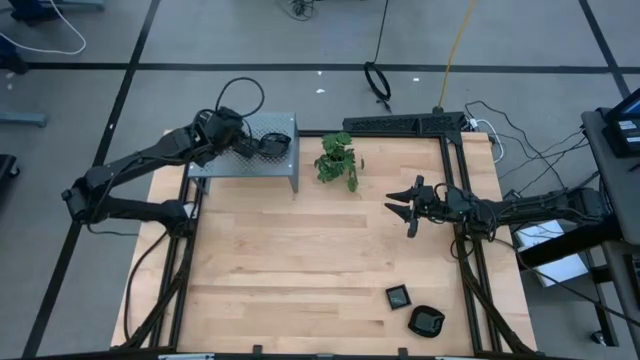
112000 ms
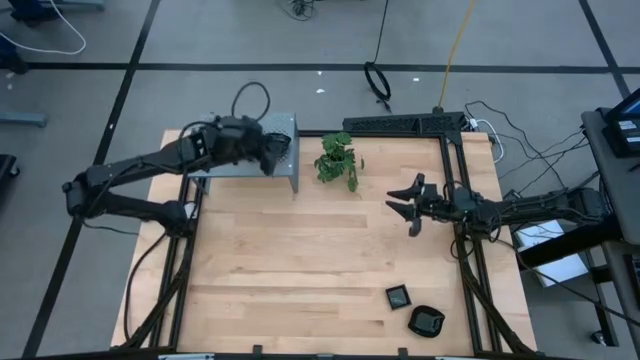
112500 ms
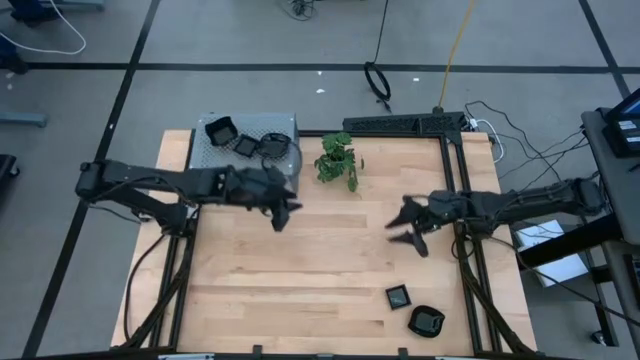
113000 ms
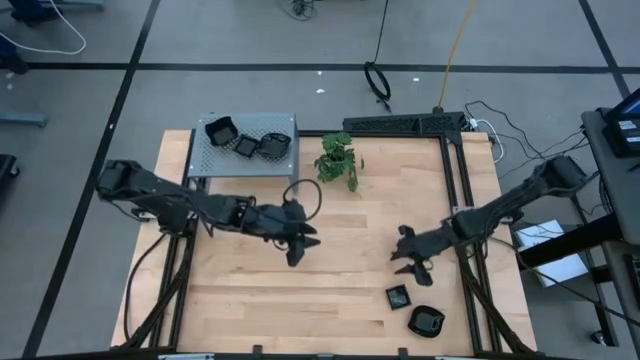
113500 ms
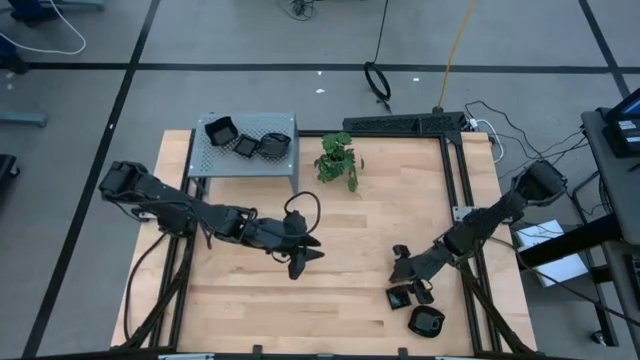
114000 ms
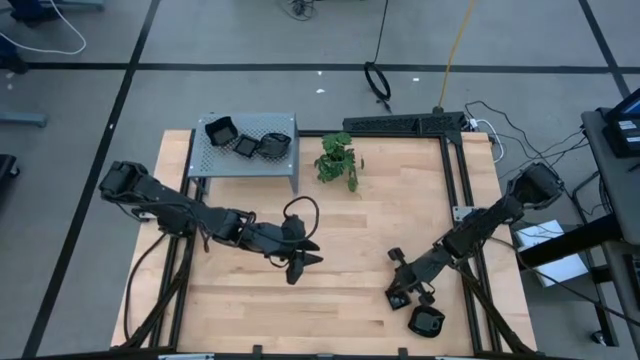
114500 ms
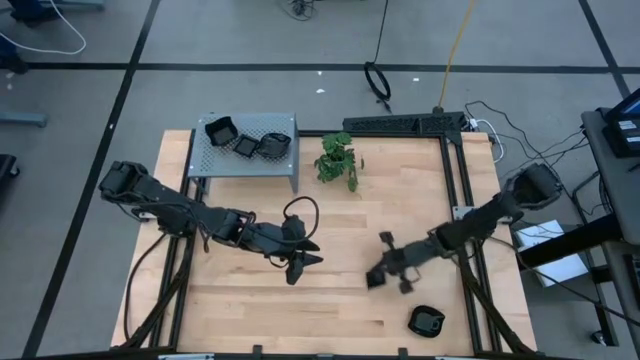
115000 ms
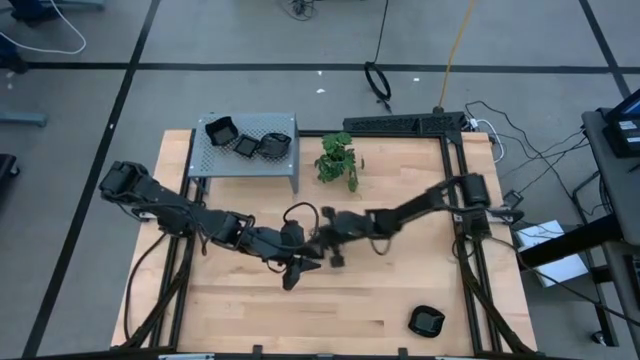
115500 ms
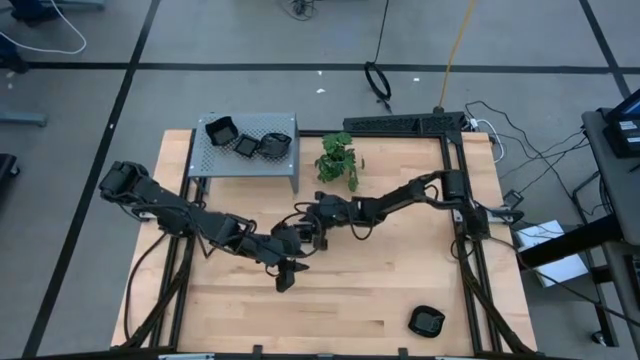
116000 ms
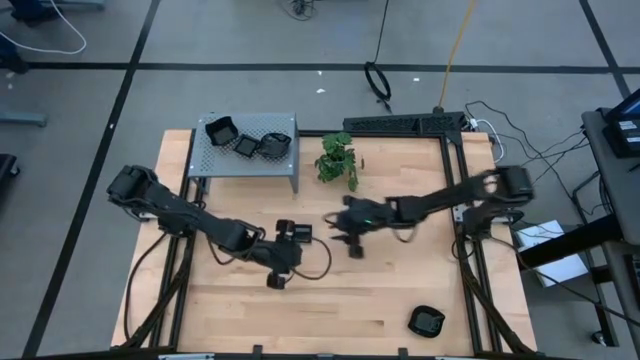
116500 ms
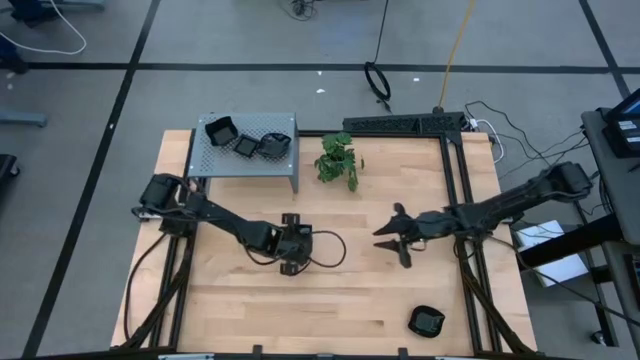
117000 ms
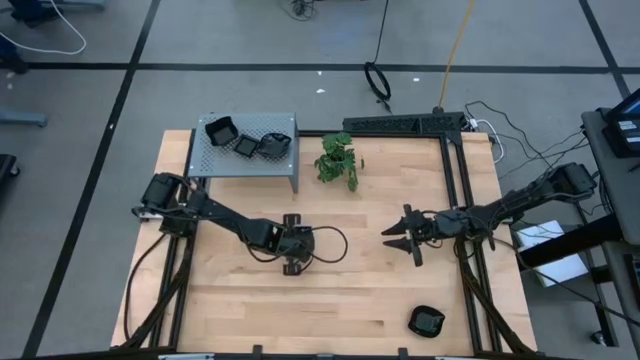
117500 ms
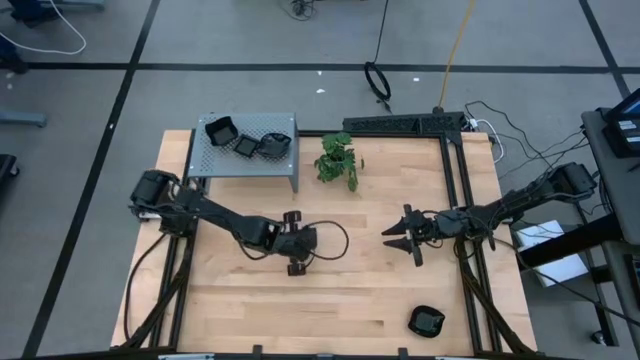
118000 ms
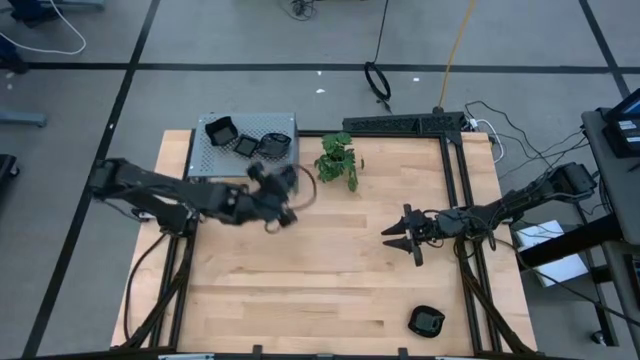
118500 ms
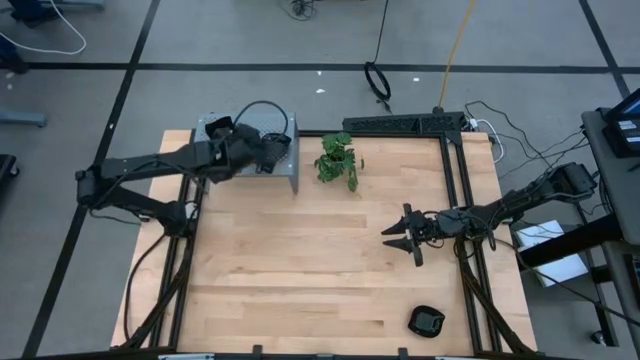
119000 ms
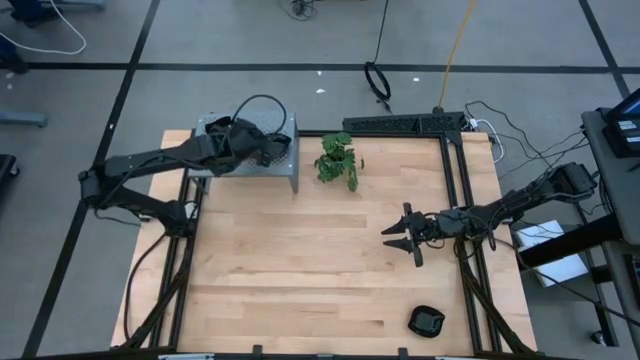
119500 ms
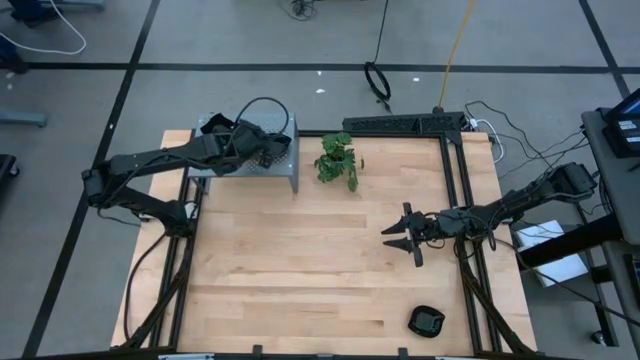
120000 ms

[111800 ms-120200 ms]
Task: Pick & Place Mini shaped plates
Stack the square plate on top of the square plate on the shelf

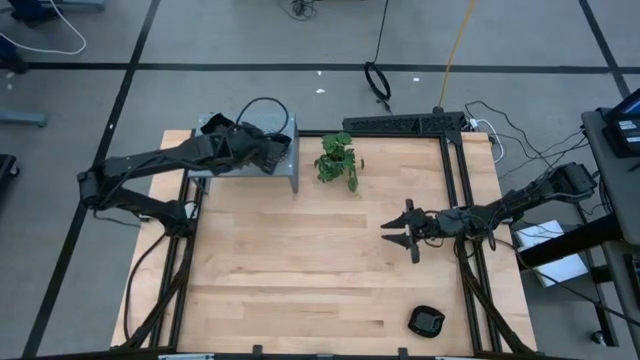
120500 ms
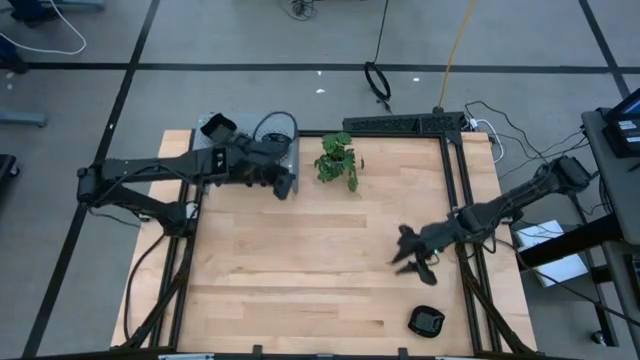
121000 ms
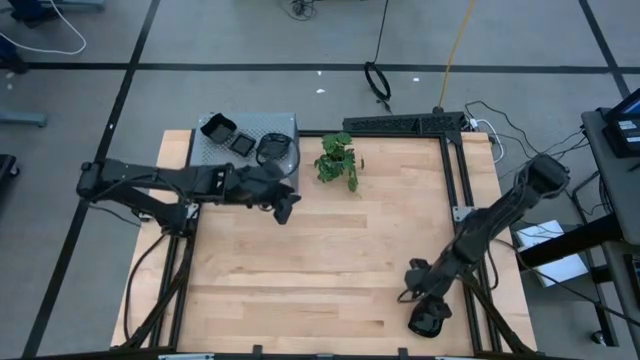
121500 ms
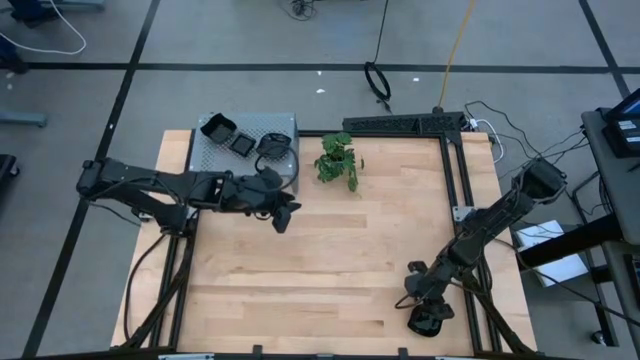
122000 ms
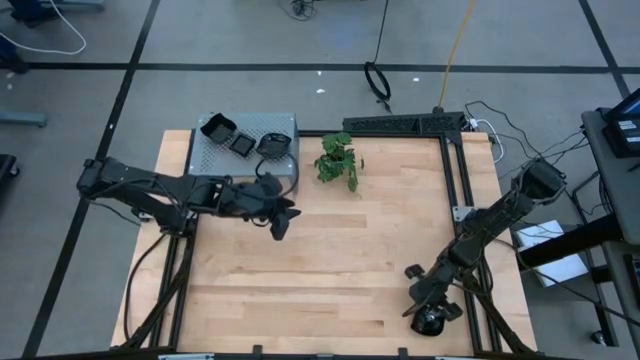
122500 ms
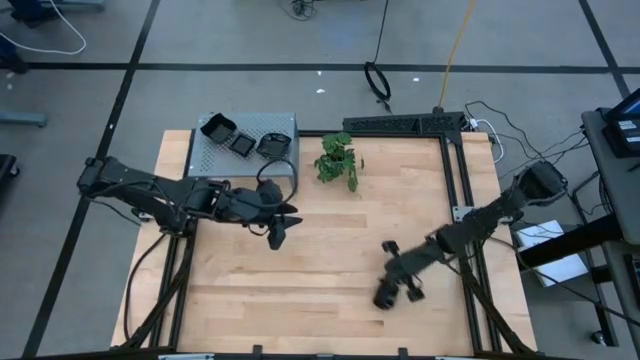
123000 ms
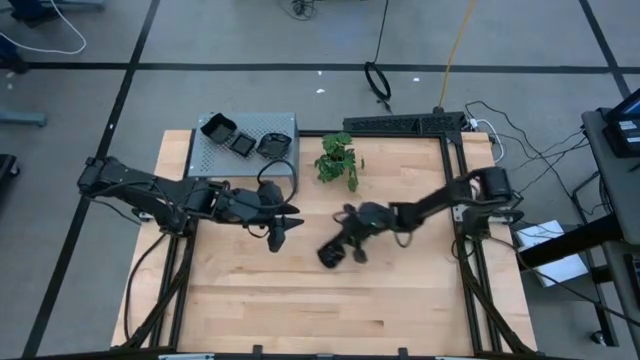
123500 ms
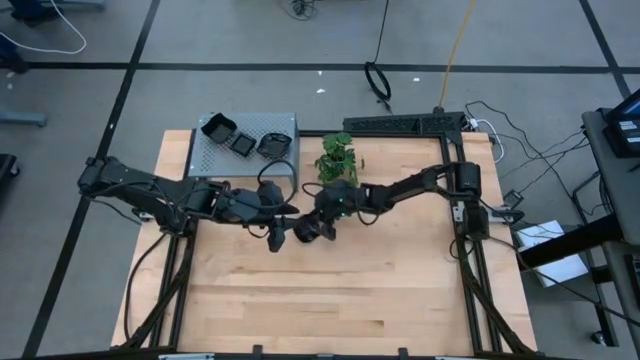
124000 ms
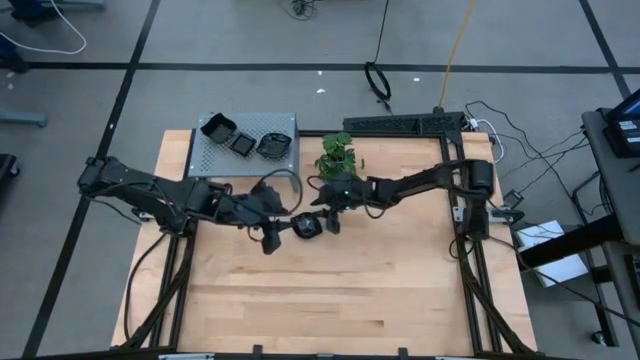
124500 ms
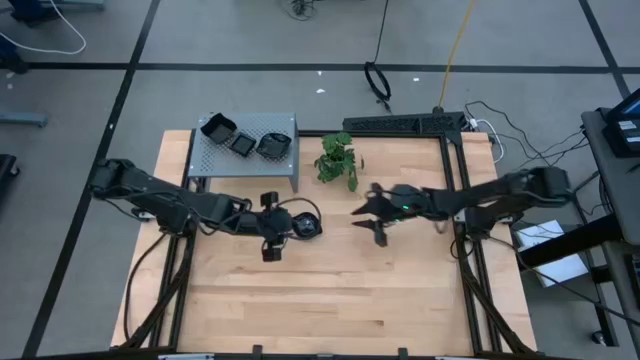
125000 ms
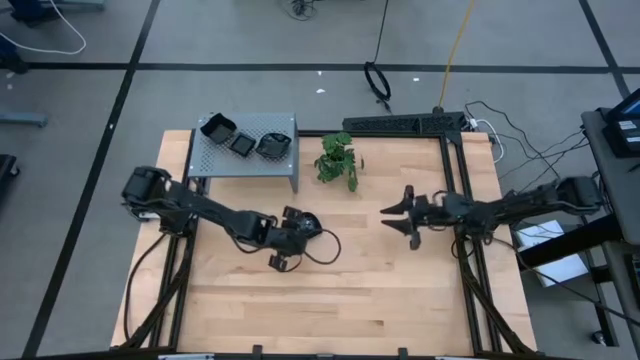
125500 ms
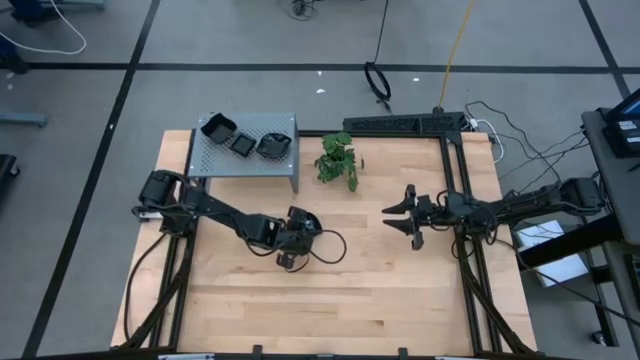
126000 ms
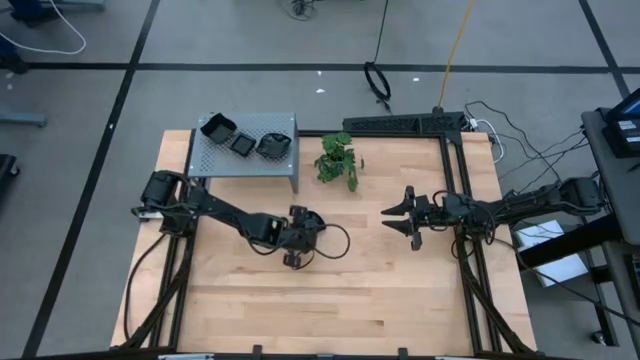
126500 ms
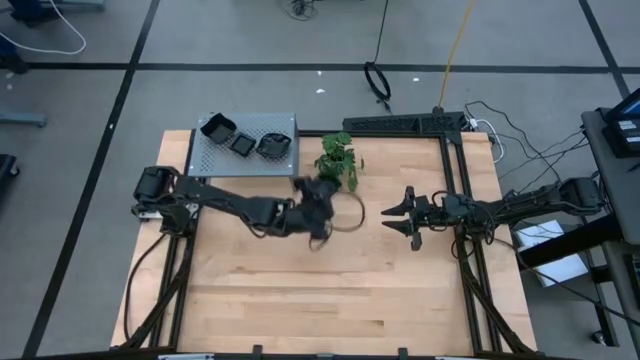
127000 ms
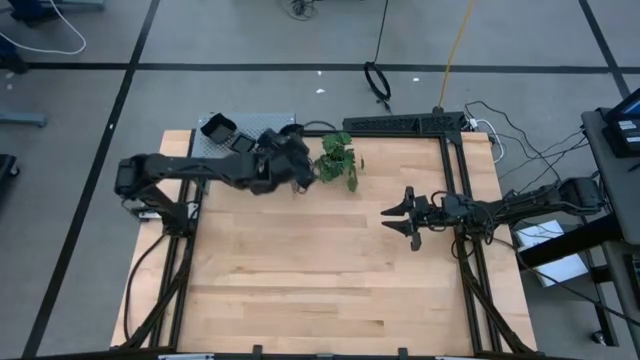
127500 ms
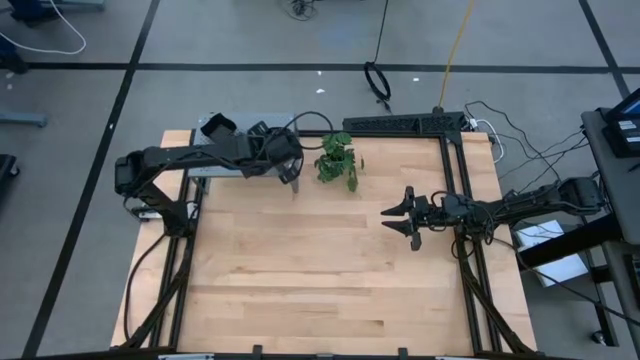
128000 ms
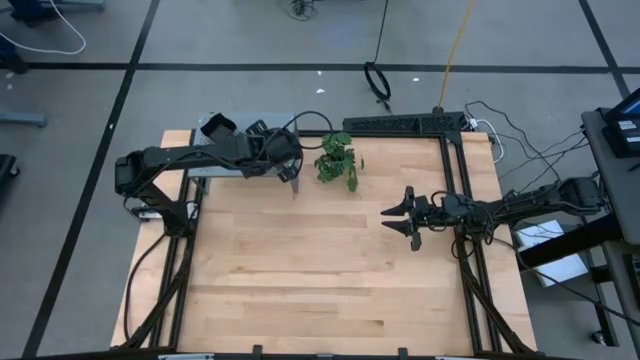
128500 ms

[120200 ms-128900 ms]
Stack the leaf-shaped plate on top of the leaf-shaped plate on the shelf

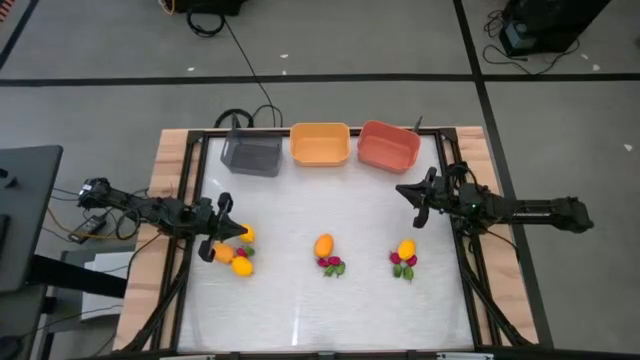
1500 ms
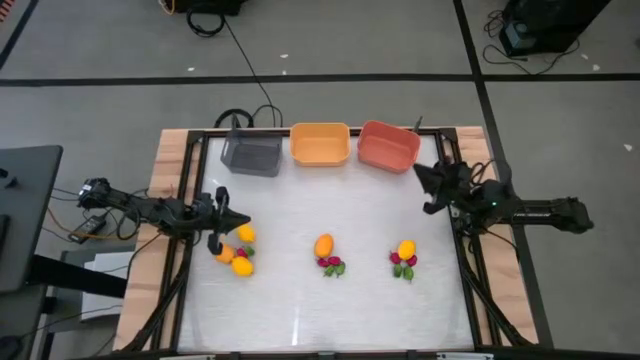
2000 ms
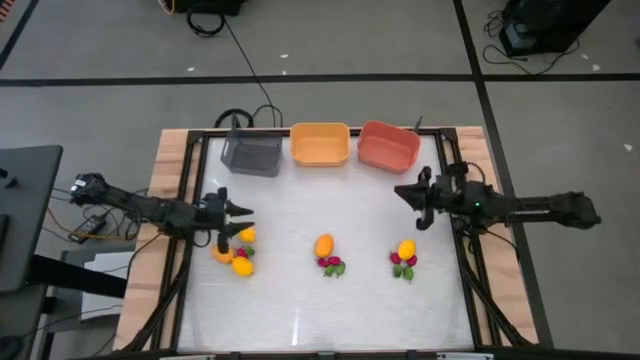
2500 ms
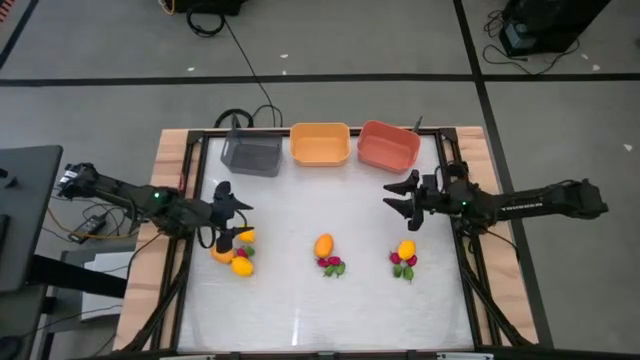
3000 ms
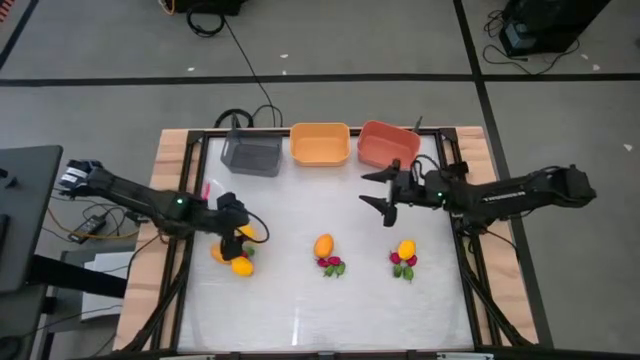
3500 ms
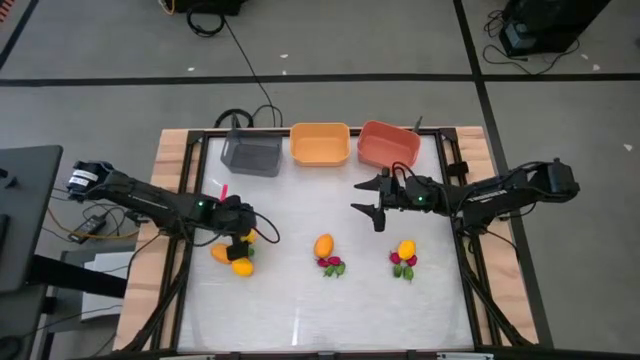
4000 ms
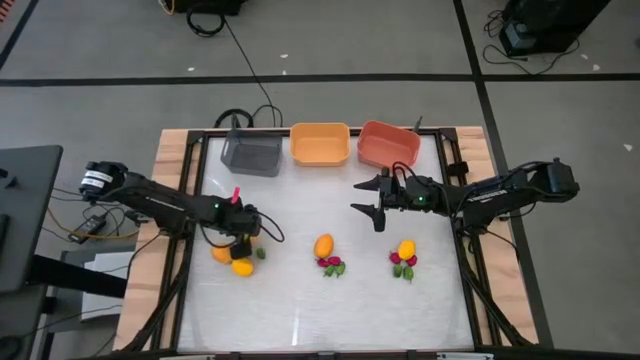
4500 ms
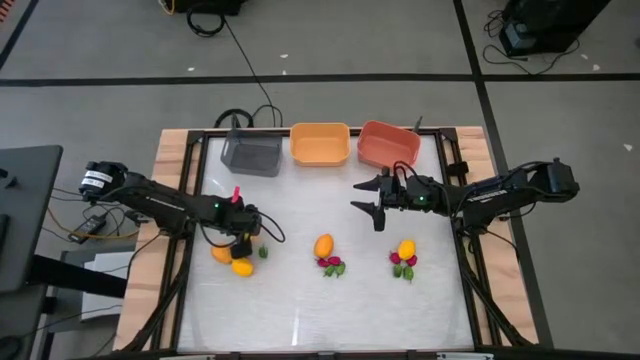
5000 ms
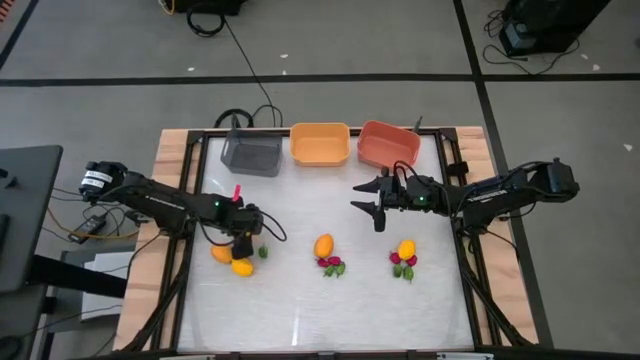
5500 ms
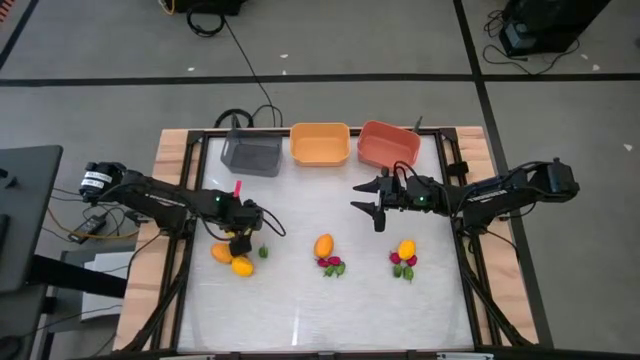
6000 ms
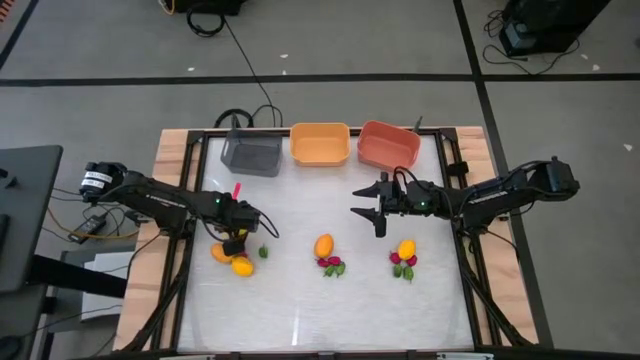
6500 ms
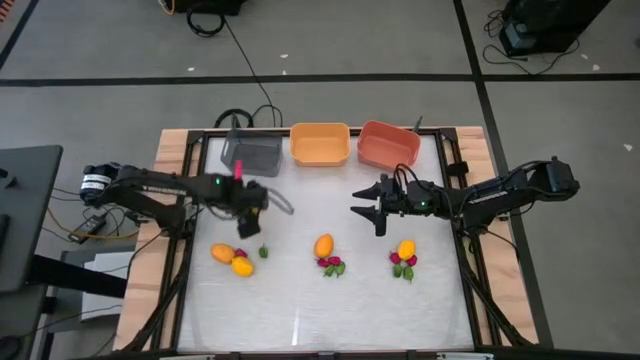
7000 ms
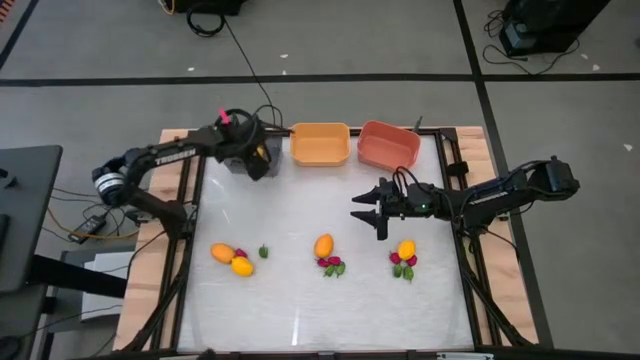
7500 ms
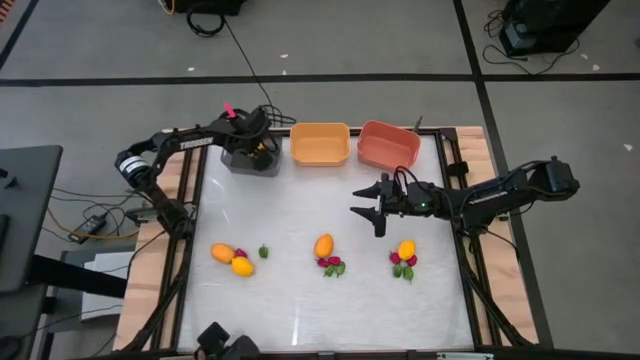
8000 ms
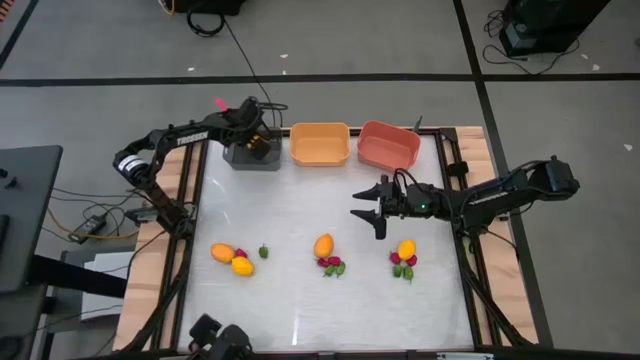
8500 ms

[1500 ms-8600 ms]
Task: Sort produce into baskets
Put the lemon into the black bin
